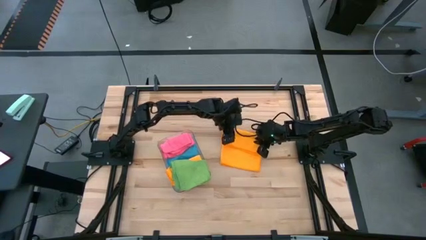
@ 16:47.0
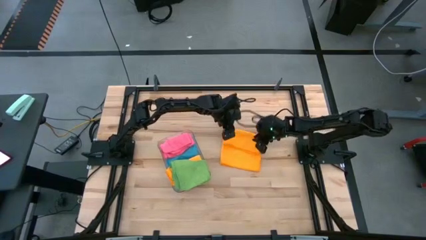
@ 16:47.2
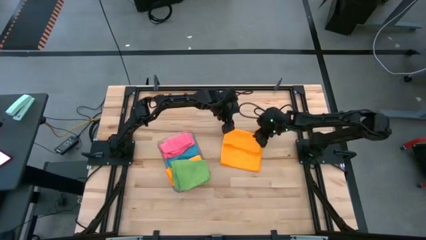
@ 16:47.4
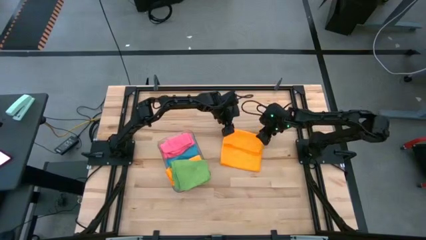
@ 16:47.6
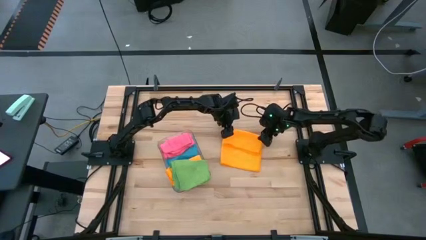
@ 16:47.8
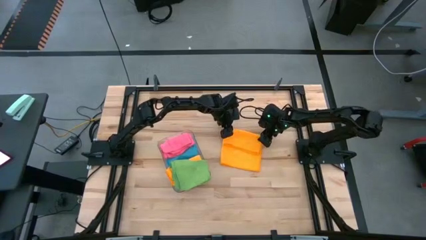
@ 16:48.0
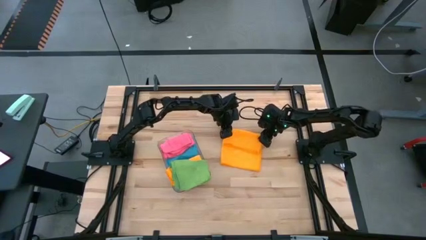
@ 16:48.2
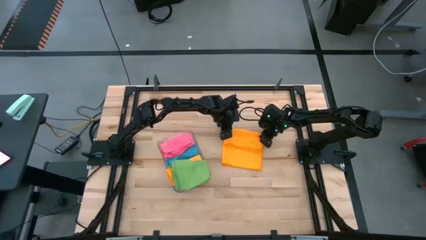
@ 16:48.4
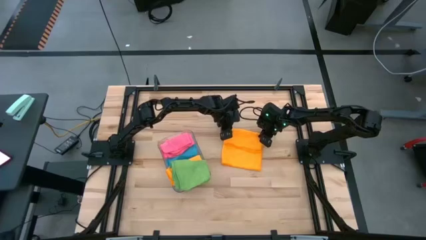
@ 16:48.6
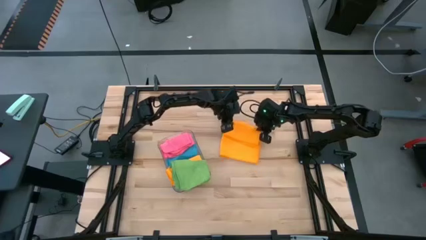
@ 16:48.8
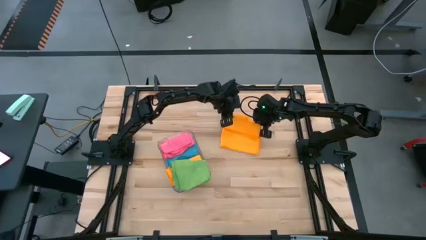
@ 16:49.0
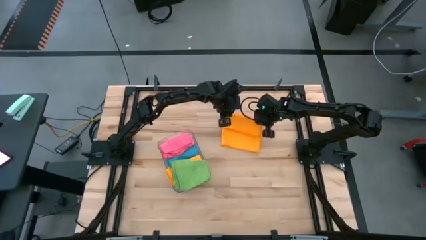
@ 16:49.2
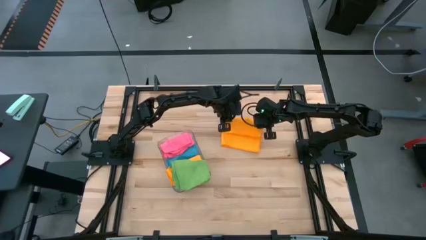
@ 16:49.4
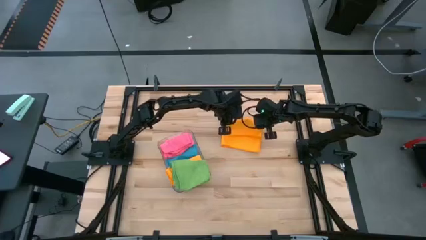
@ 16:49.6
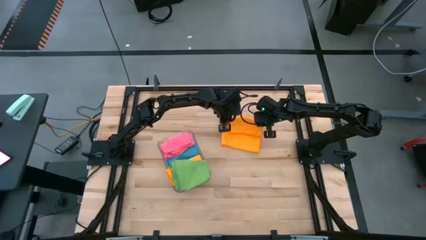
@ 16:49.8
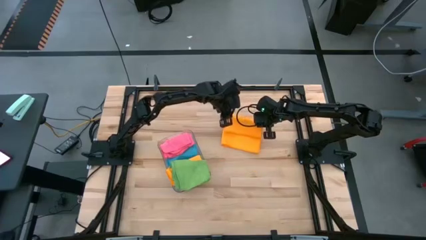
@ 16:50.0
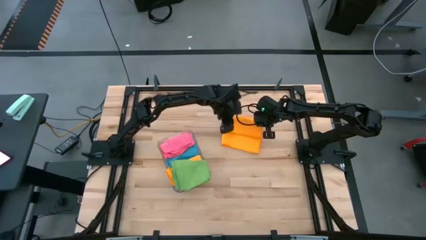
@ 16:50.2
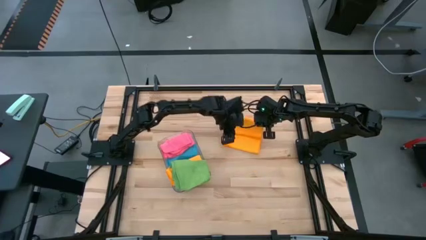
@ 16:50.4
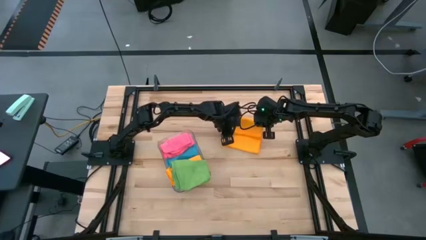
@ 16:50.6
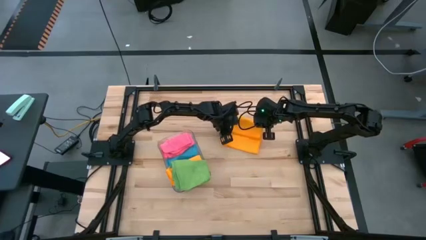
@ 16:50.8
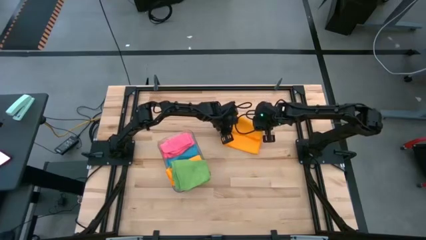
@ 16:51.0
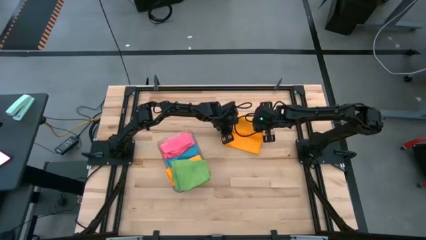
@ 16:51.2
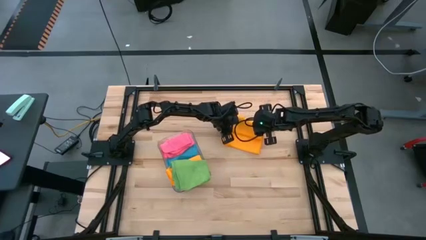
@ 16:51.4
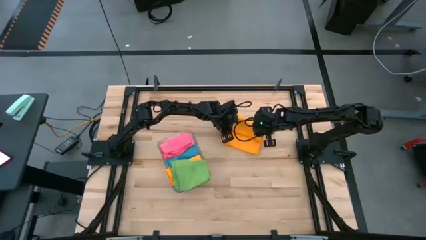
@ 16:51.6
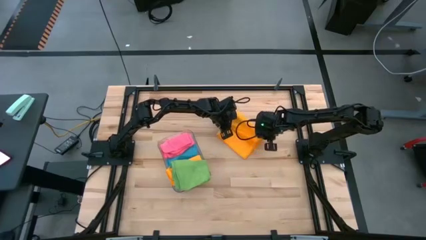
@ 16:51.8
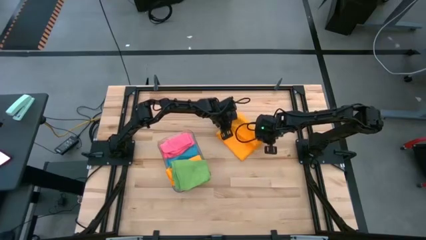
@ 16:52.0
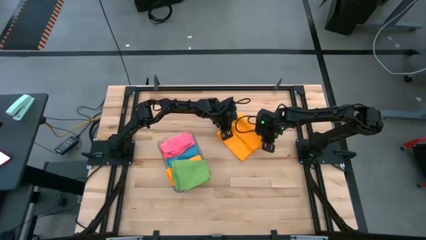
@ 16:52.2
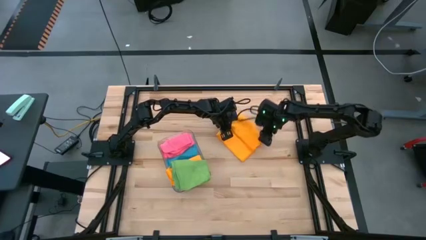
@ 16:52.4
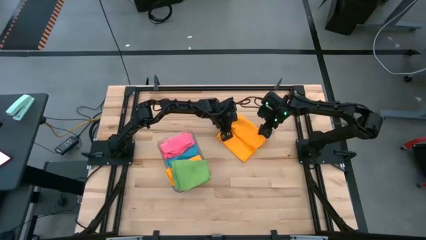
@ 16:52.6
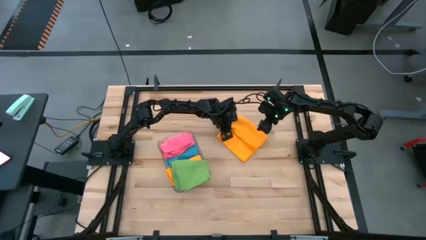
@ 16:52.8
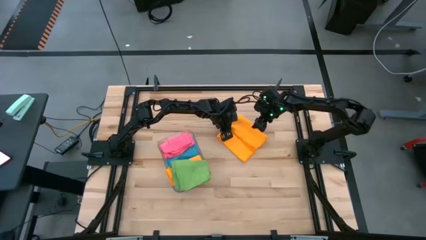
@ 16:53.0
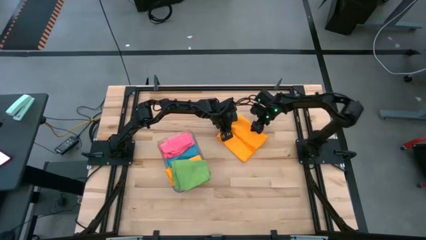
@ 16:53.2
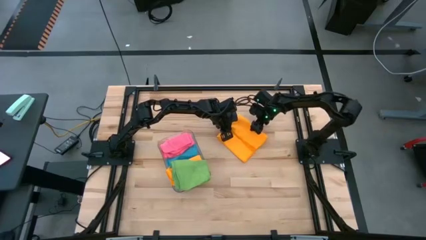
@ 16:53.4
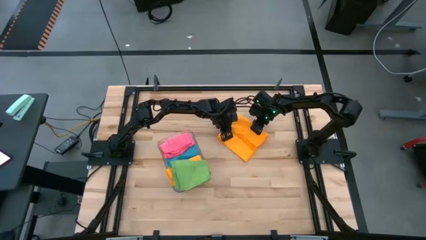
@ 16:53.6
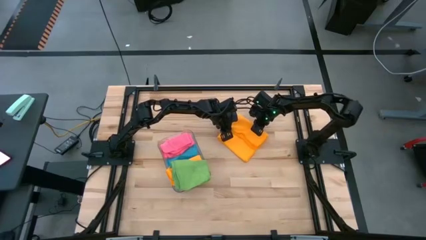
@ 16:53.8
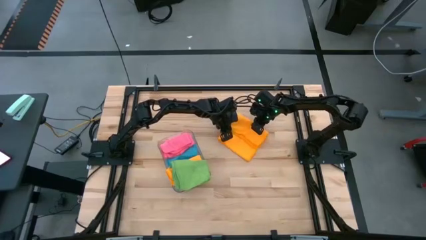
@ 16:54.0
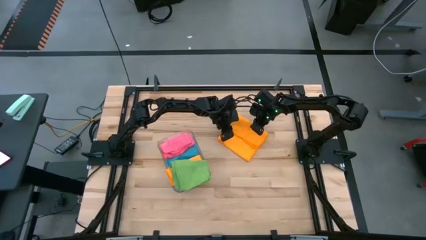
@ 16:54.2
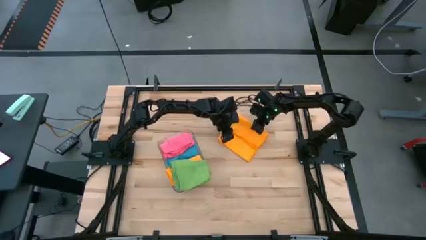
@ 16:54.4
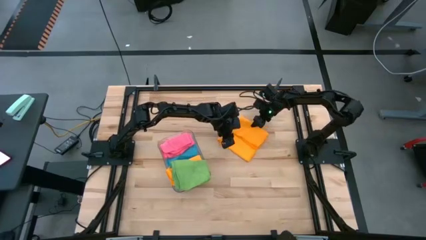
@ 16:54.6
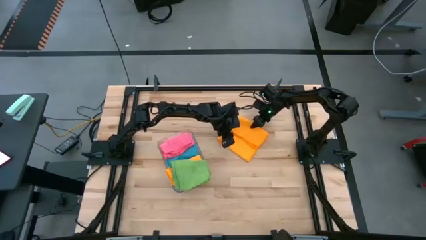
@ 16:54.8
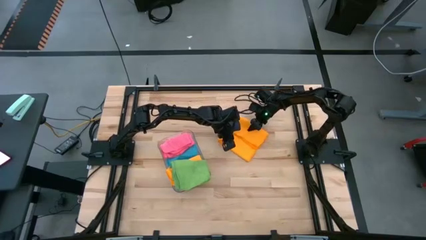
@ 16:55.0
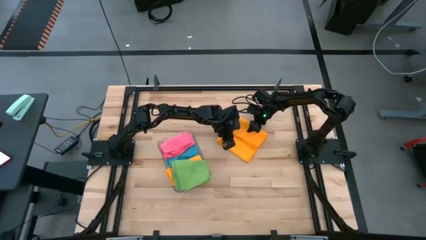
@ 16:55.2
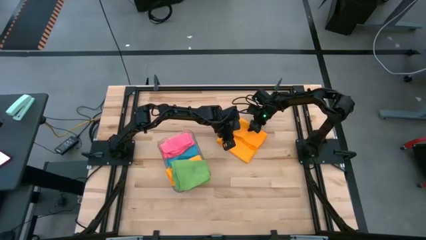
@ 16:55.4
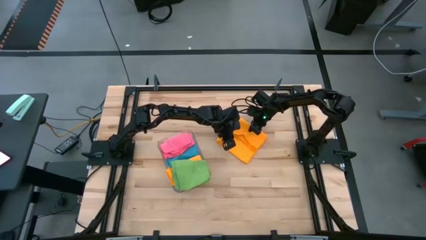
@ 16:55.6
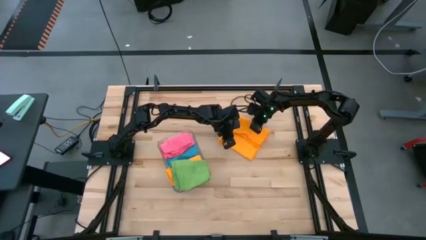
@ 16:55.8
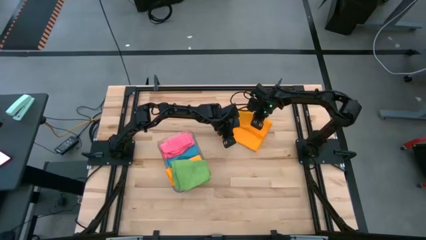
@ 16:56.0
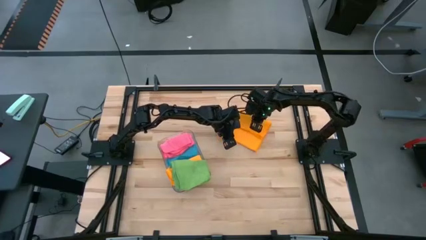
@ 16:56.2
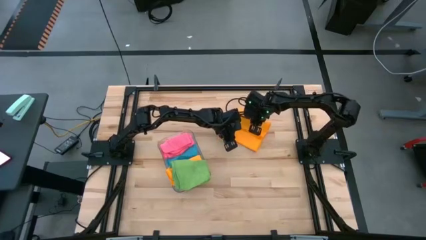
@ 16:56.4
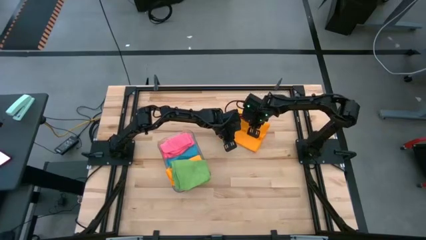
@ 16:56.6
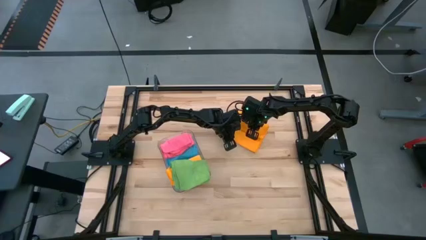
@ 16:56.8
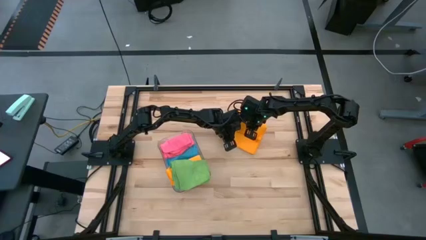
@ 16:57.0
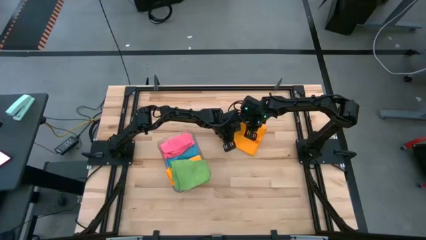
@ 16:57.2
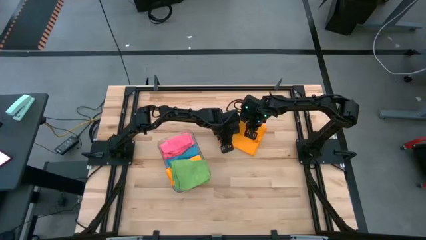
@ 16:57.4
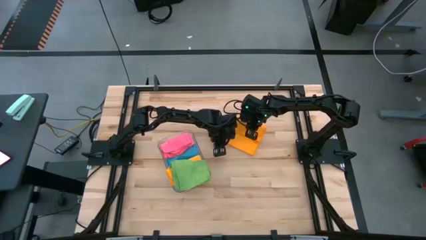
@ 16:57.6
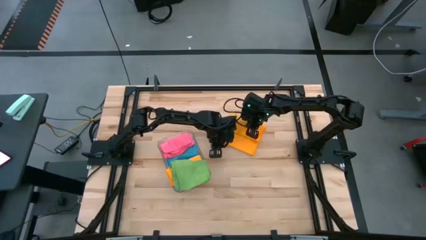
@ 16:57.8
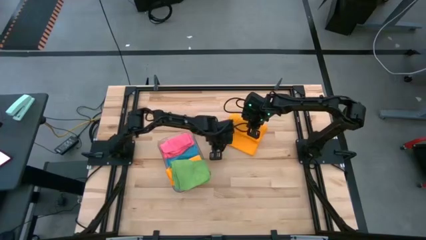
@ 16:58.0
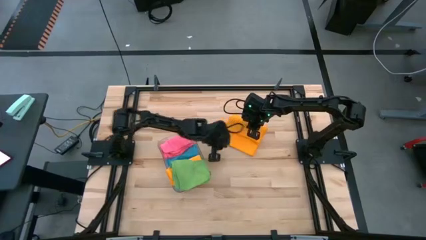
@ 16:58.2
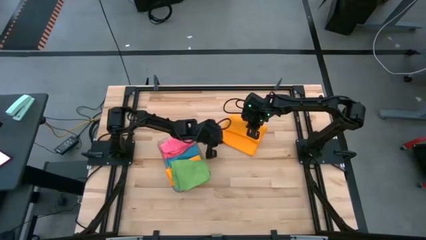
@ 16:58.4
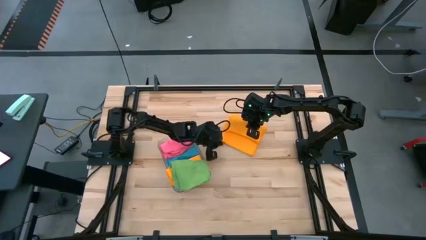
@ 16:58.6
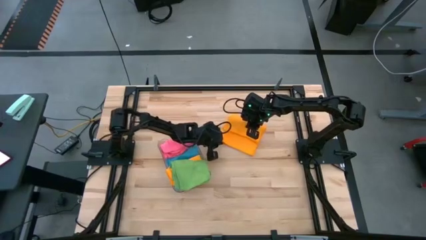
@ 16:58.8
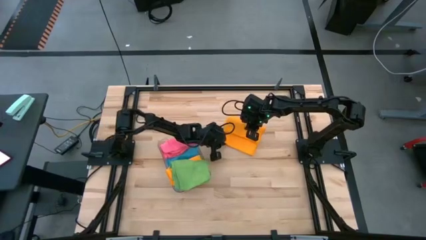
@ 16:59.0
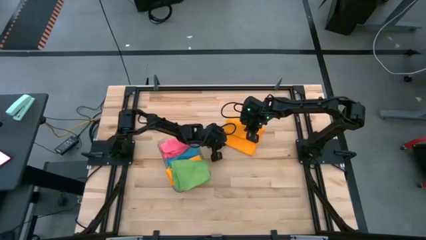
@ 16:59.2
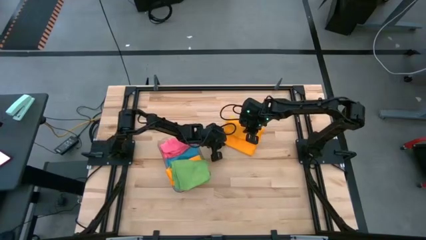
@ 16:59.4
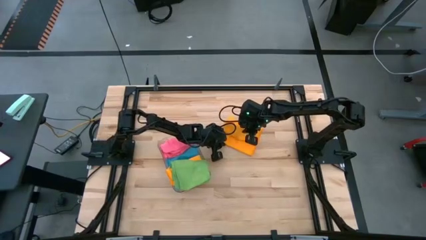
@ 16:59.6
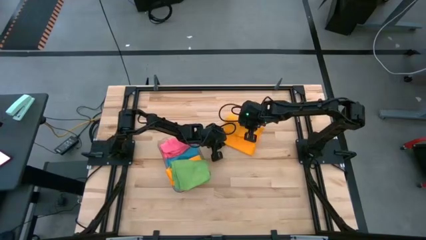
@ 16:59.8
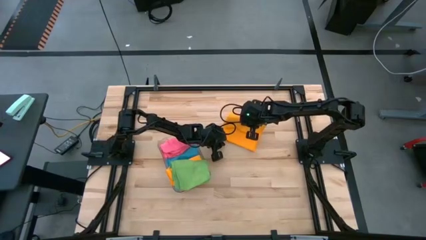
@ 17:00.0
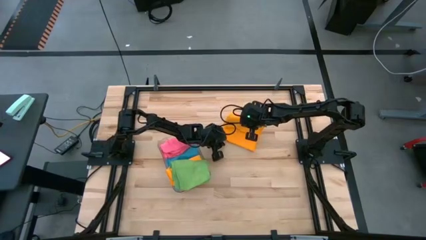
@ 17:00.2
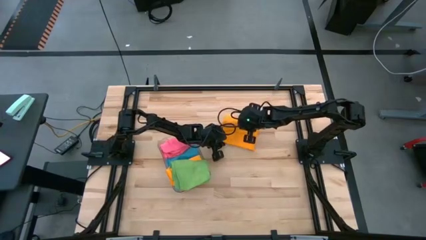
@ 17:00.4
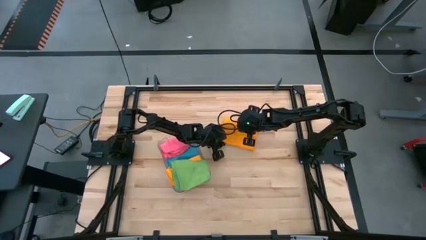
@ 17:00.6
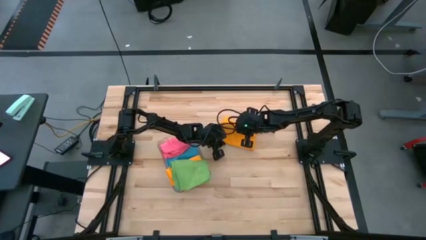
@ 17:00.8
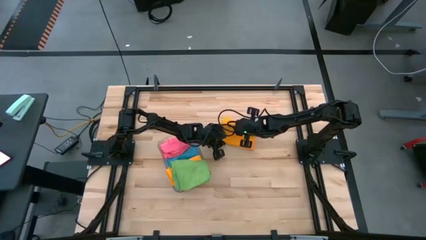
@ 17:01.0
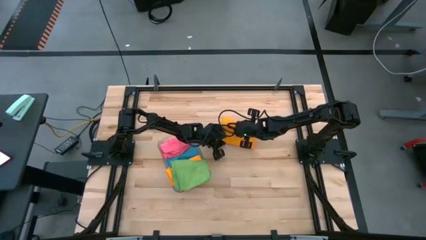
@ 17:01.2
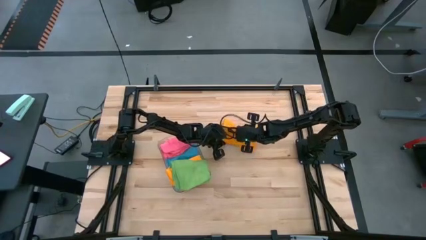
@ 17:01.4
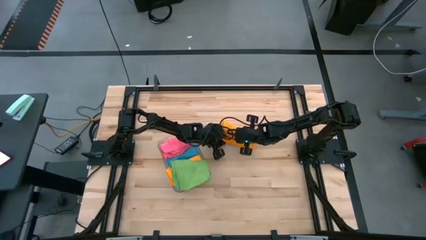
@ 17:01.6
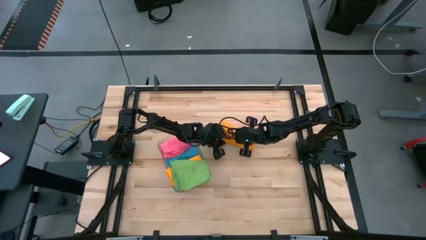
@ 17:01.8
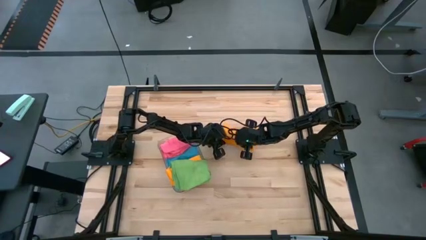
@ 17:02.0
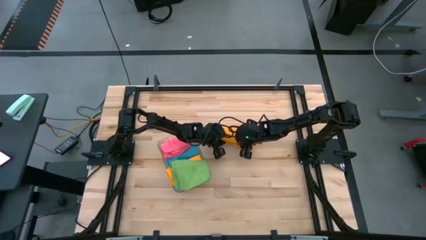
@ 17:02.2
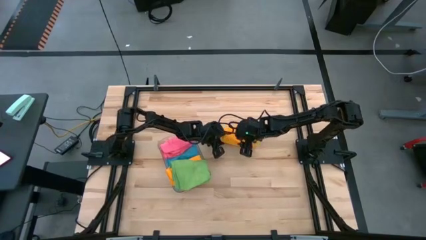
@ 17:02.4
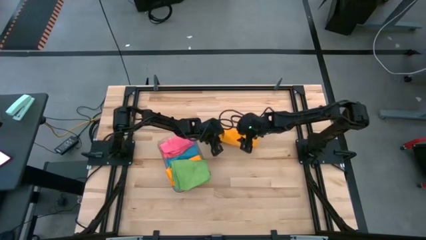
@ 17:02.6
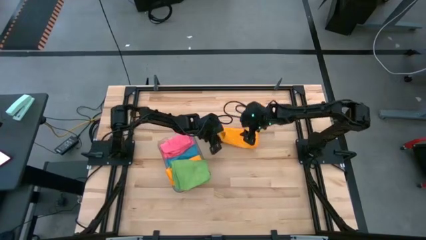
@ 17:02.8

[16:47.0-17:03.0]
Task: Fold microfiber towels
Fold the yellow towel
